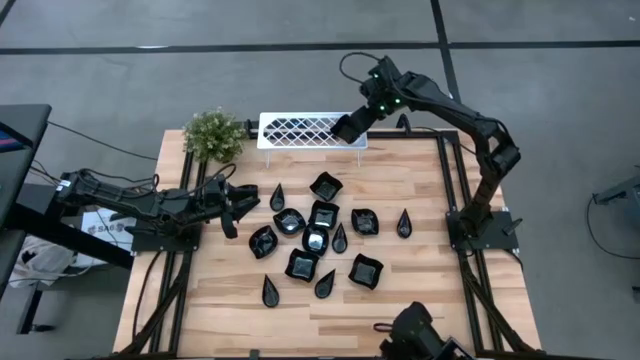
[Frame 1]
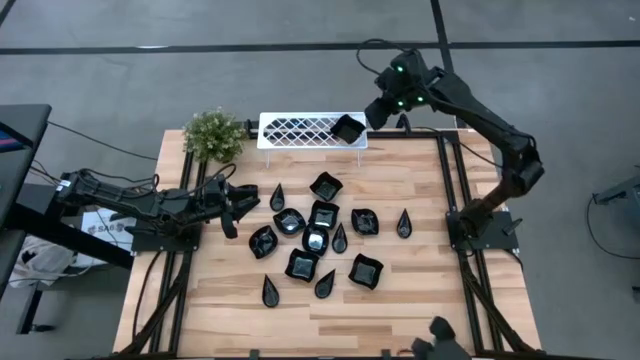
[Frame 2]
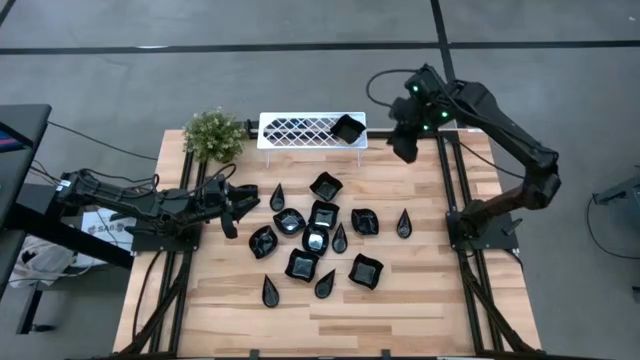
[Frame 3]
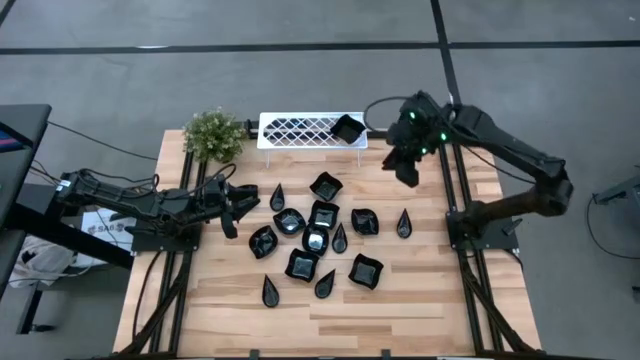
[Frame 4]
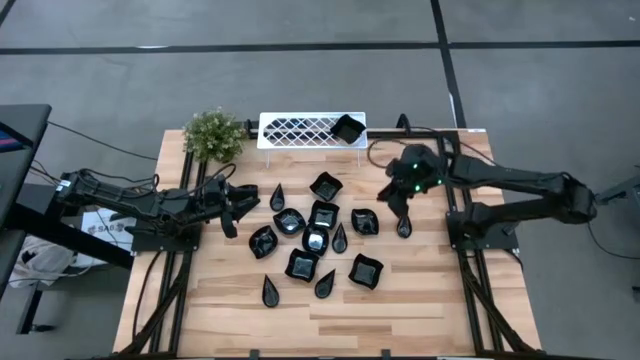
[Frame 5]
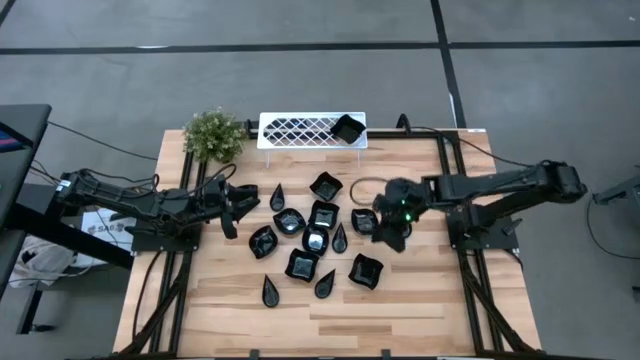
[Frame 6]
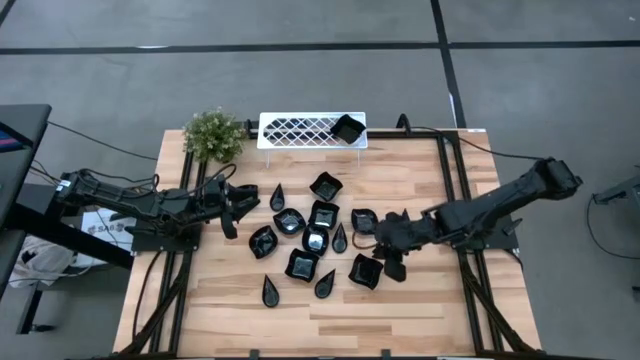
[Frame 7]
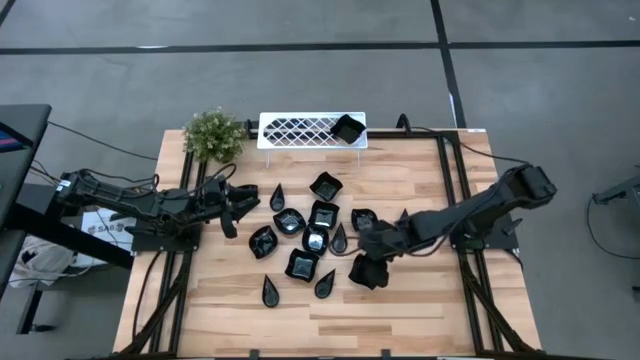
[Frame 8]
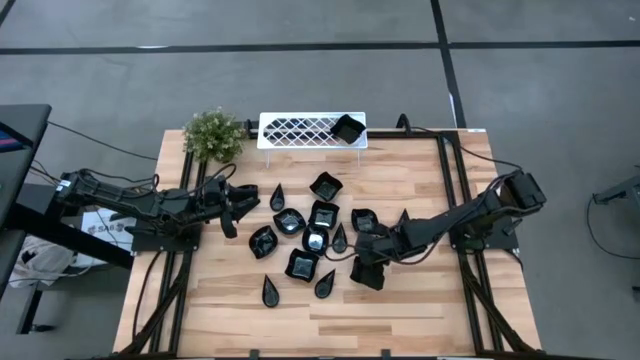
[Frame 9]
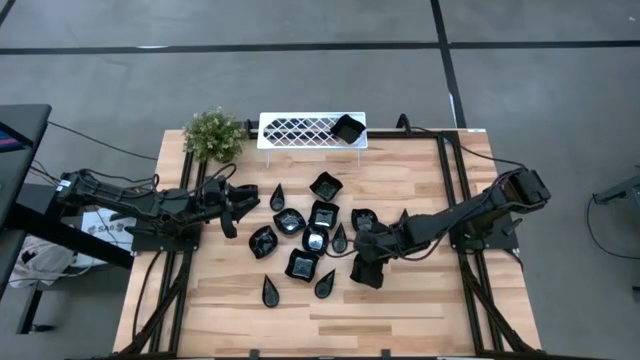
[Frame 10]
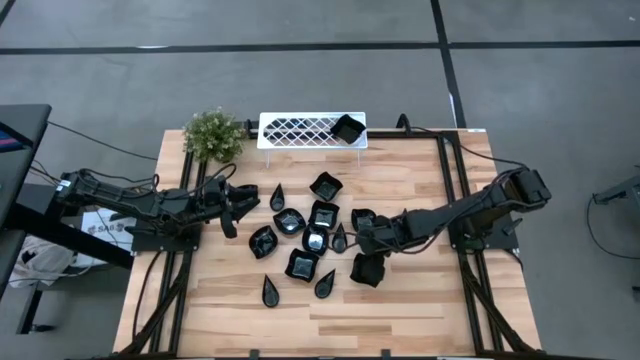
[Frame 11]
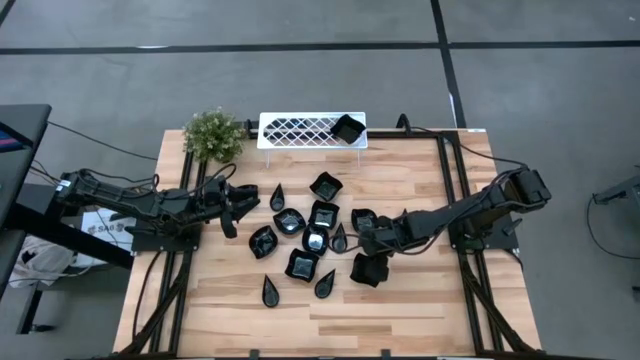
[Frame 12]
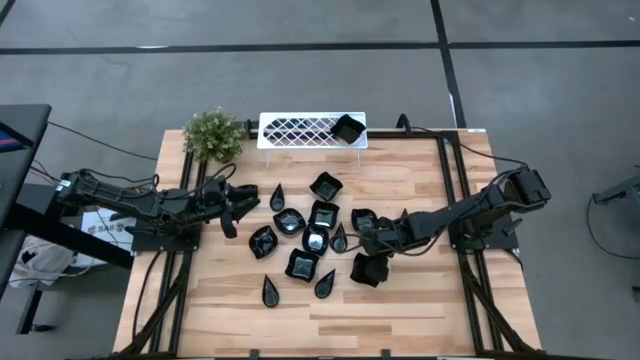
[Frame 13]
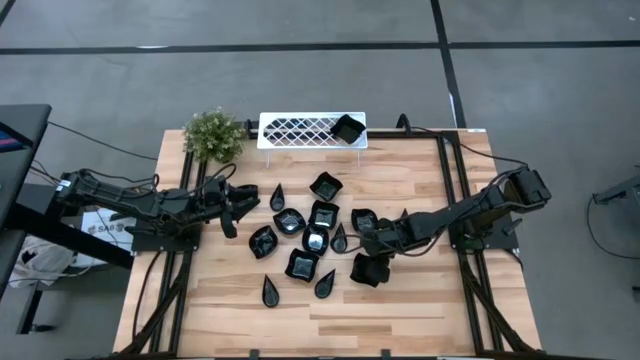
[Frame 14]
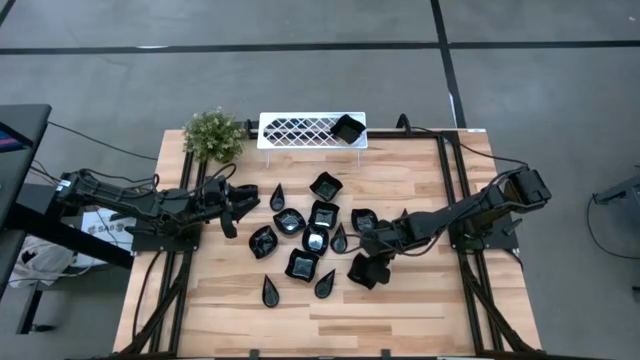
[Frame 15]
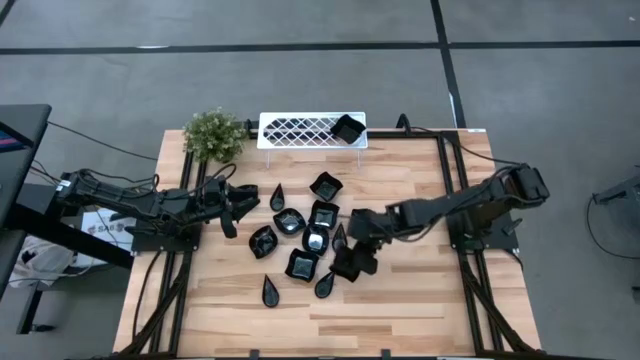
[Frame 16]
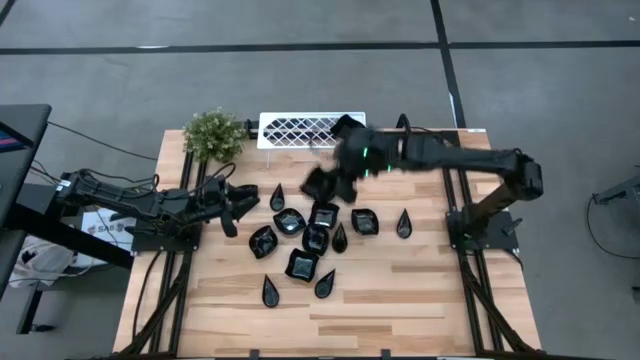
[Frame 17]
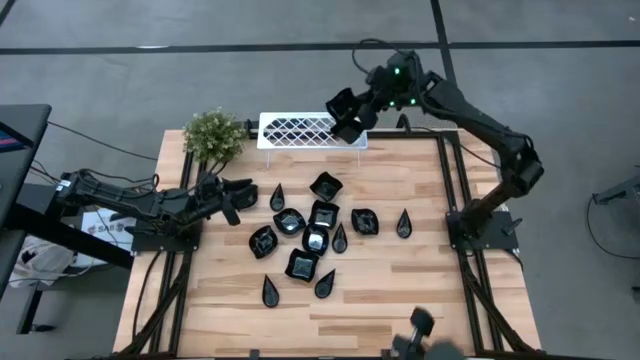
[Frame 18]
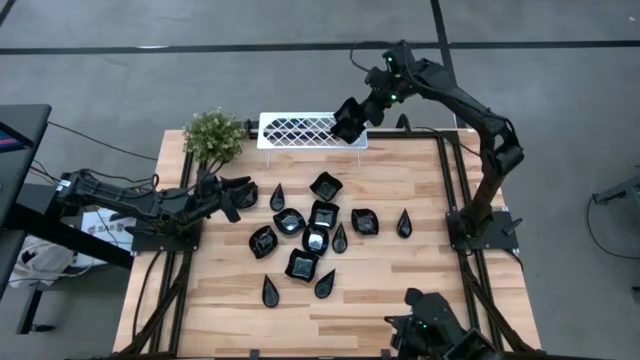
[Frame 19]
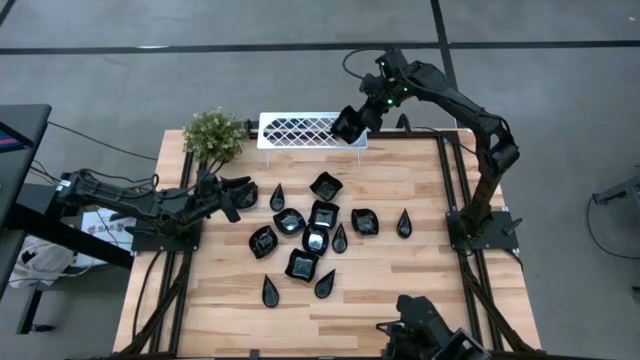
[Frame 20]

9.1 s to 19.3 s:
Task: Pick & Place Mini shaped plates
Stack the distorted square plate on the top of the distorted square plate on the shelf

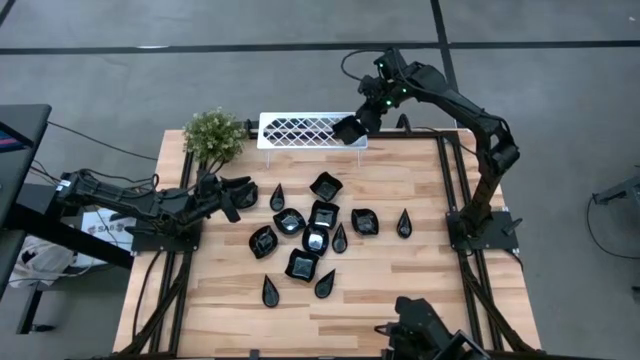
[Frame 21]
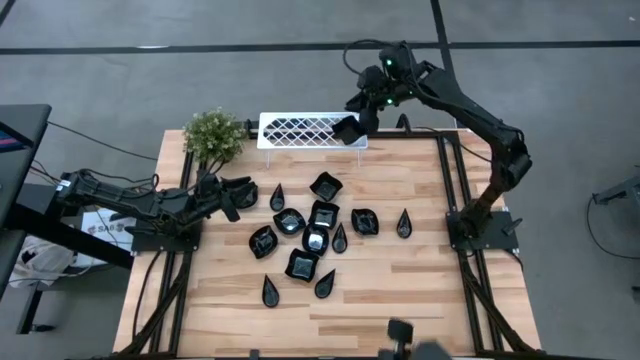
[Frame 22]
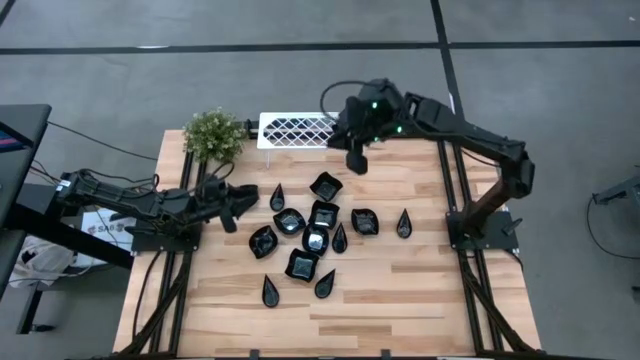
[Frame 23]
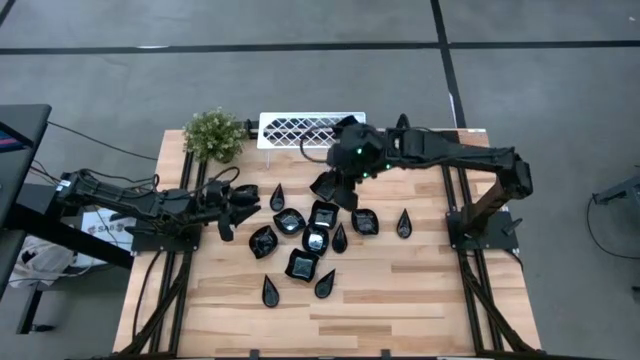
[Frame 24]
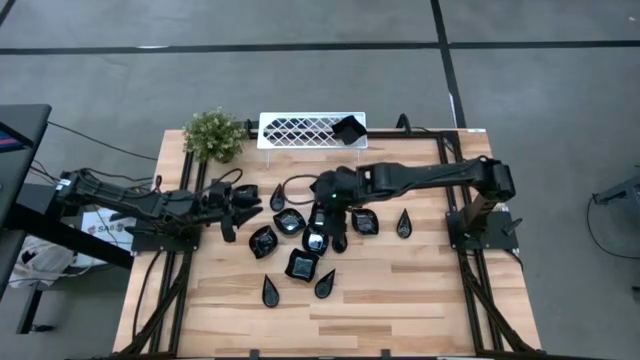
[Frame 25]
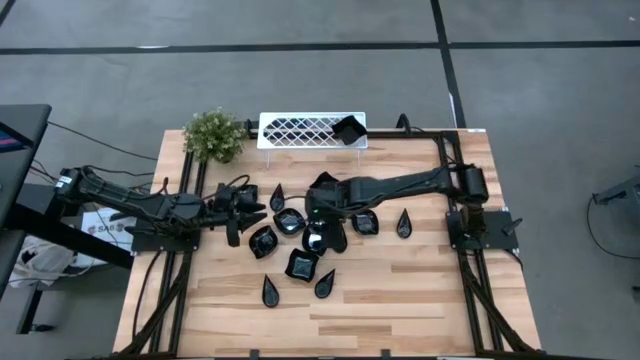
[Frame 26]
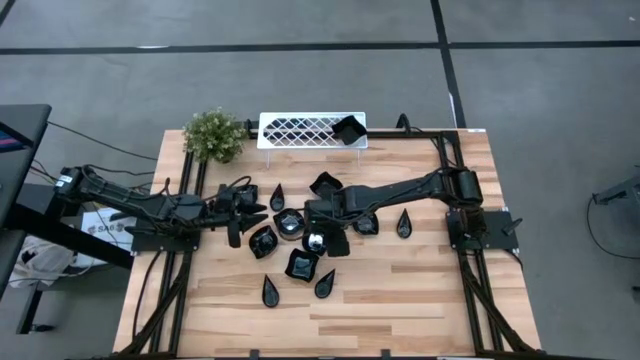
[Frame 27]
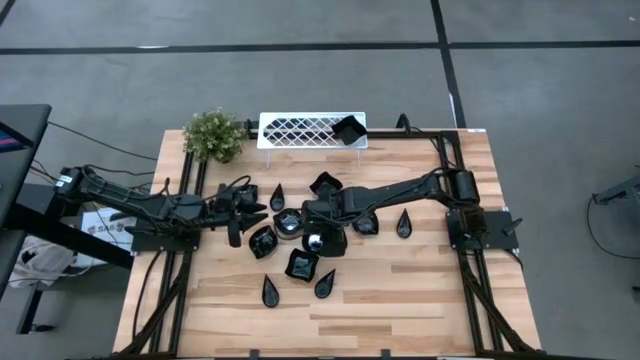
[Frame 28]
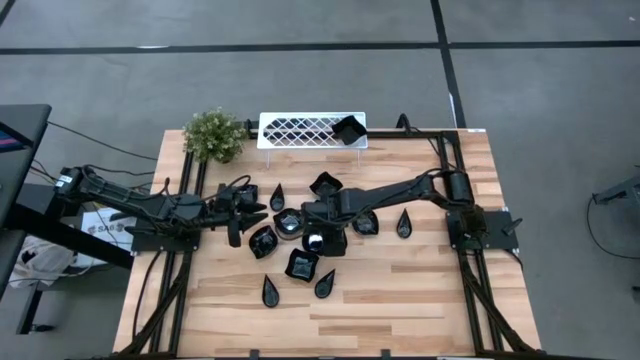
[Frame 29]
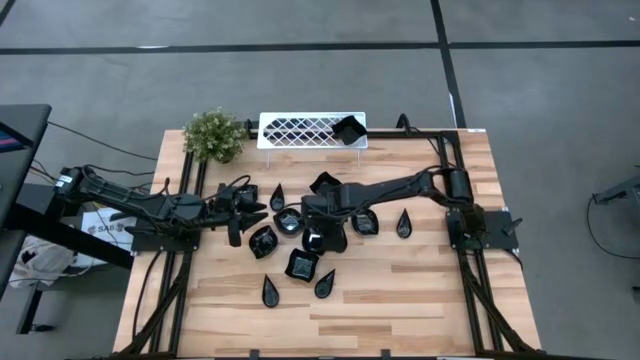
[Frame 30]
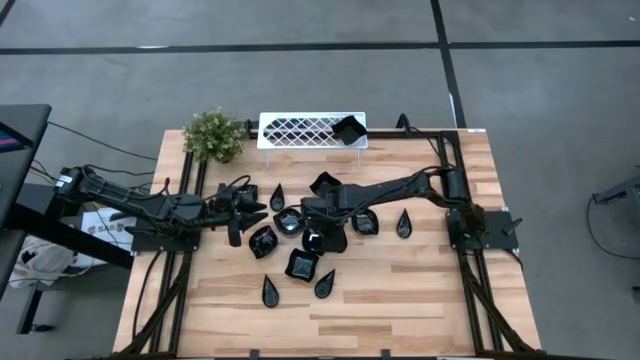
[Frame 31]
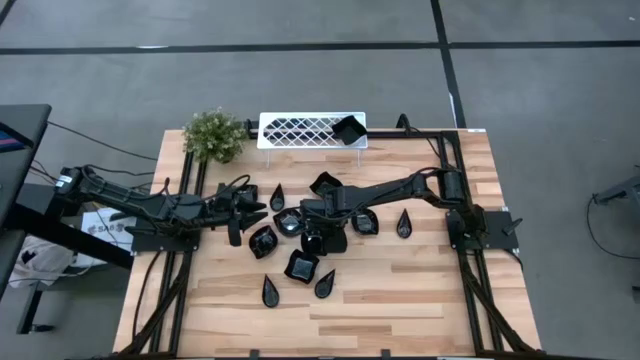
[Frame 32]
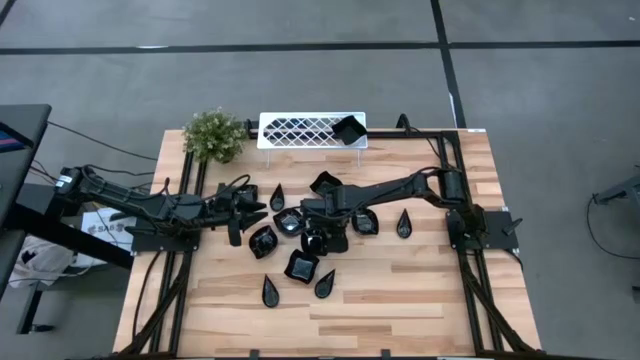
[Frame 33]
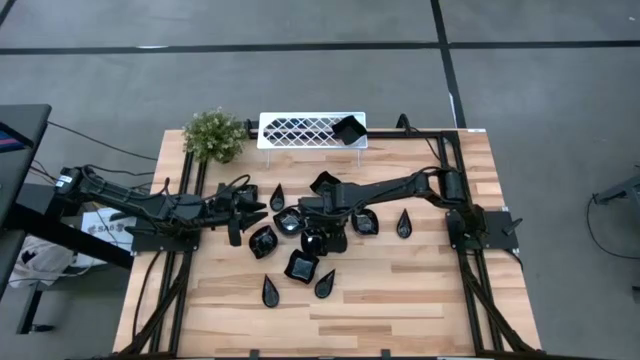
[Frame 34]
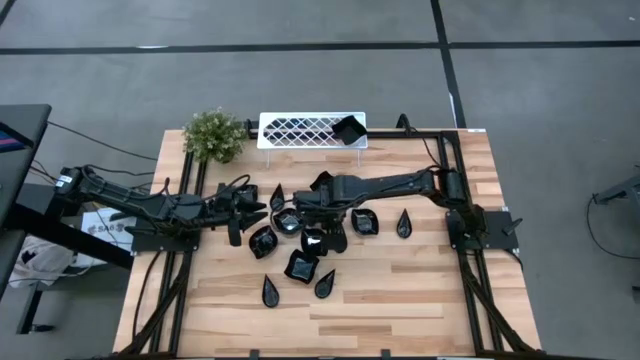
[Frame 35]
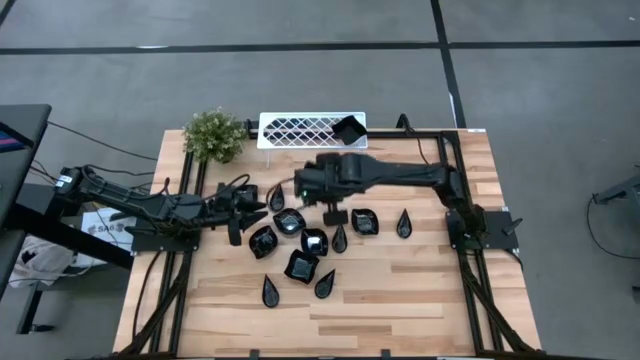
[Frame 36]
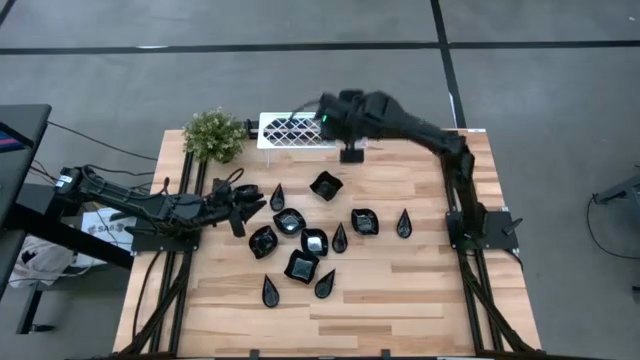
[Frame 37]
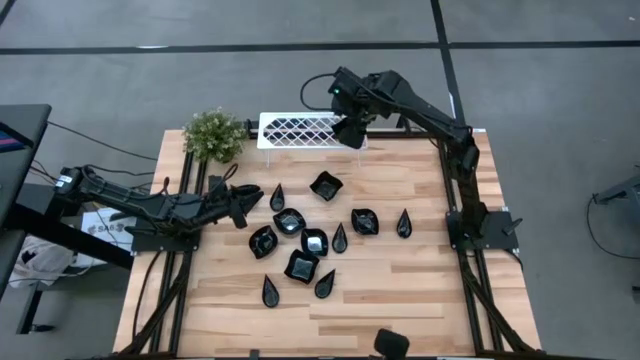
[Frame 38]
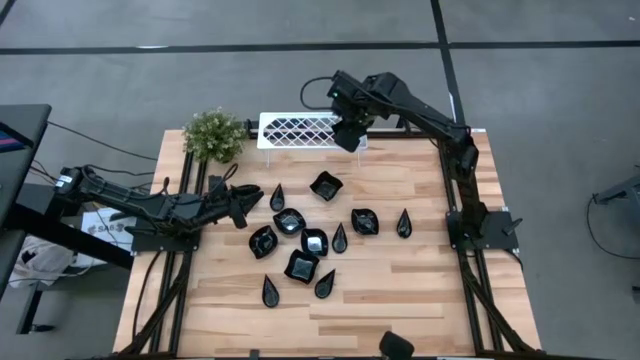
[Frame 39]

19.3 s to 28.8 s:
Stack the middle distorted square plate on the top of the distorted square plates on the shelf

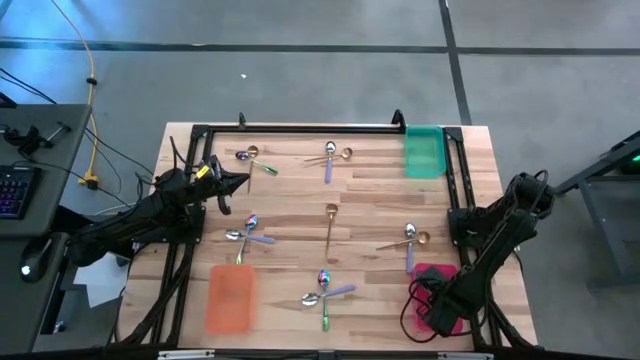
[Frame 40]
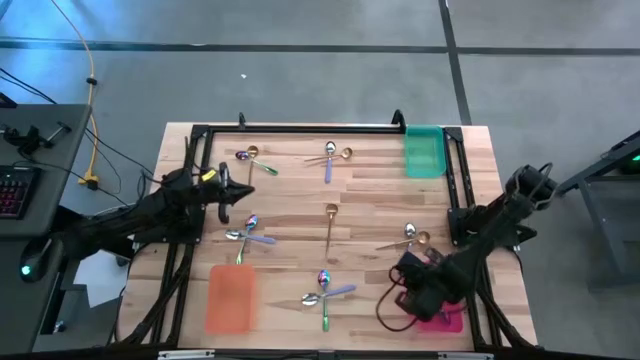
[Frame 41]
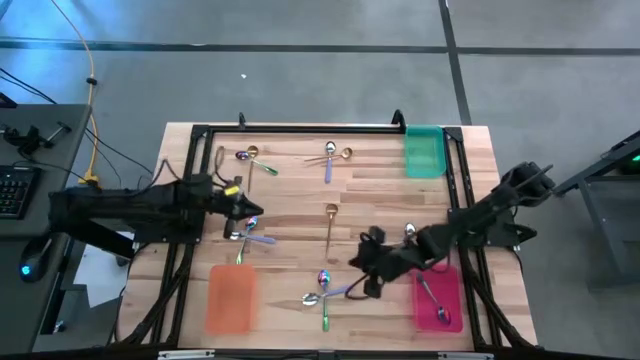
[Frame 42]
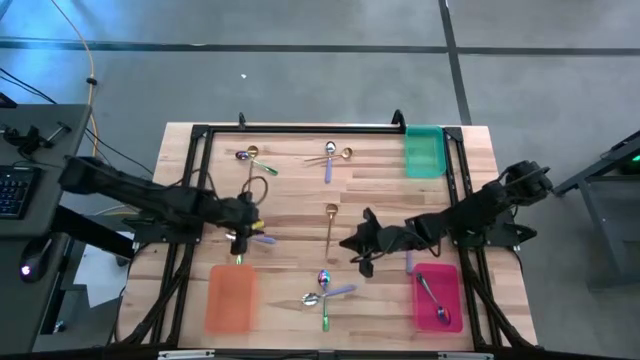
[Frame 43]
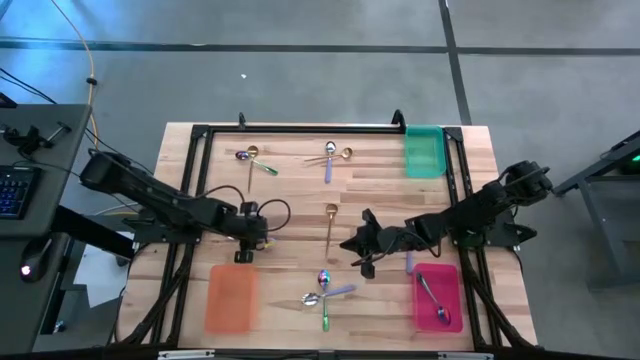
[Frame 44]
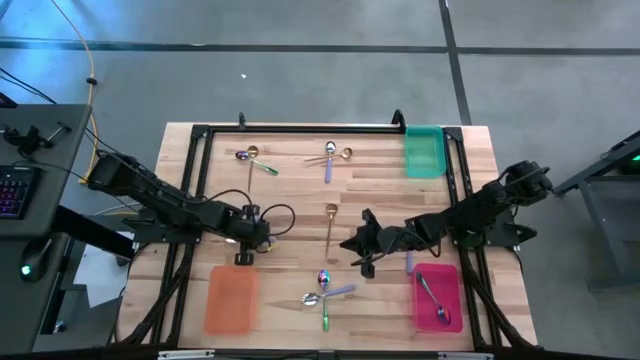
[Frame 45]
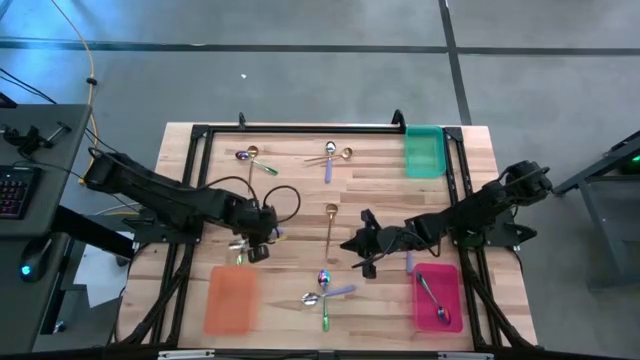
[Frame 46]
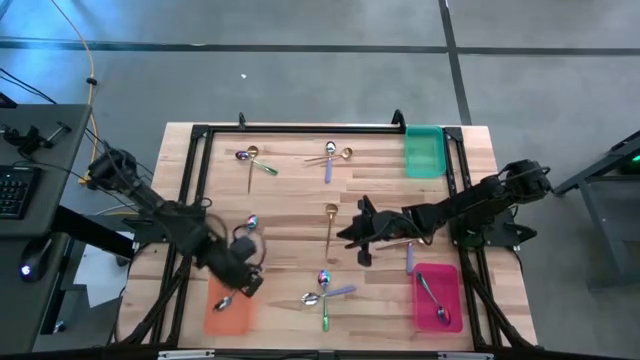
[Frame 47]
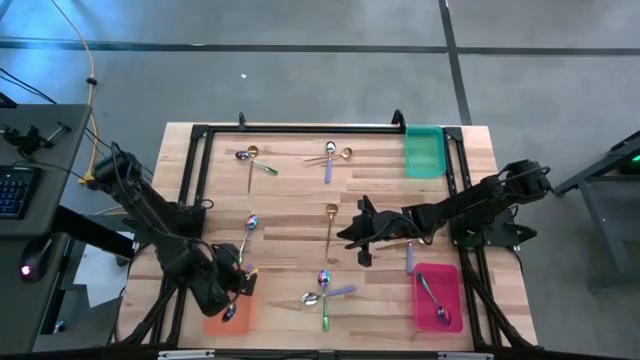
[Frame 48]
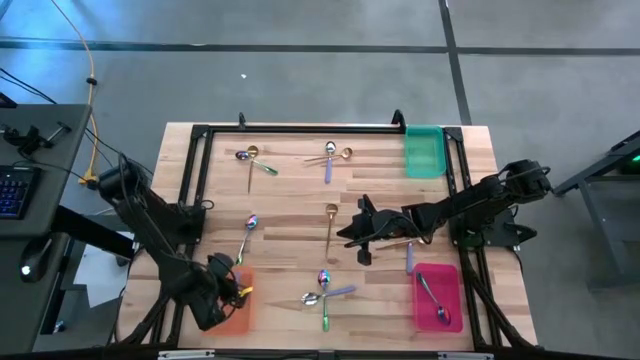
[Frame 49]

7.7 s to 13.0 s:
Task: Sort silverware by color (type)
Put the purple spoon into the orange bin
